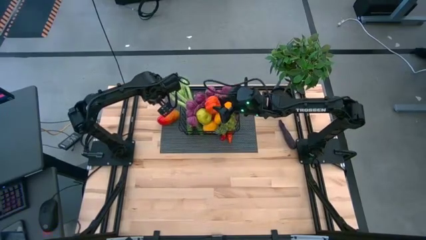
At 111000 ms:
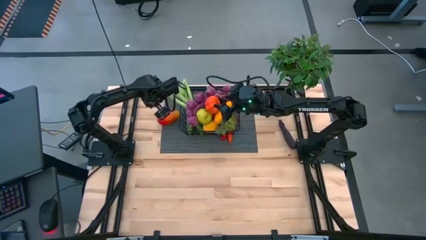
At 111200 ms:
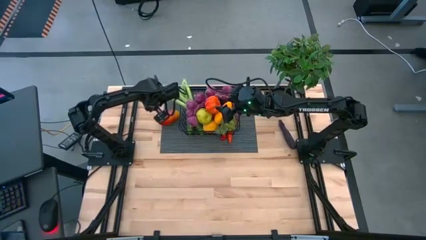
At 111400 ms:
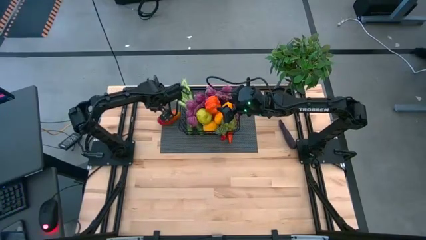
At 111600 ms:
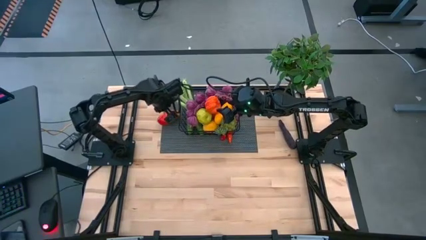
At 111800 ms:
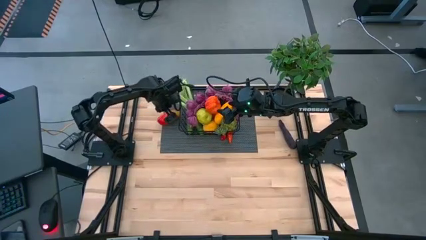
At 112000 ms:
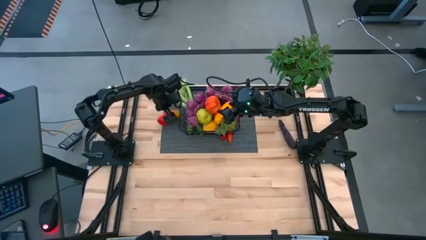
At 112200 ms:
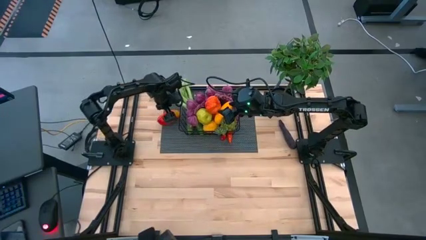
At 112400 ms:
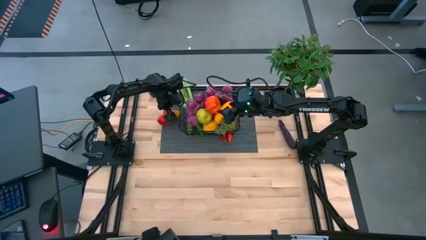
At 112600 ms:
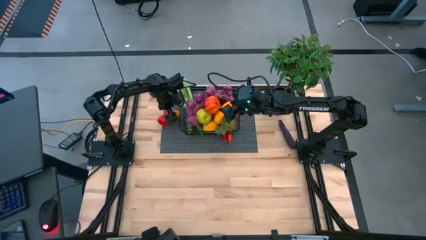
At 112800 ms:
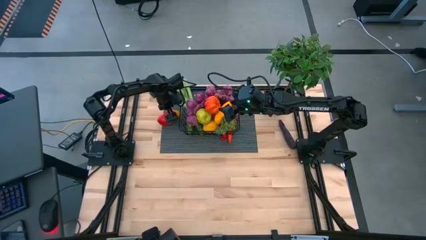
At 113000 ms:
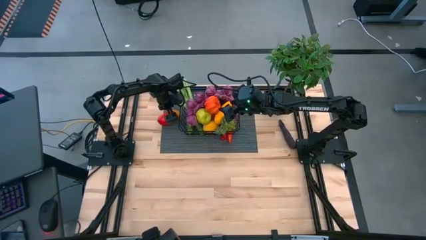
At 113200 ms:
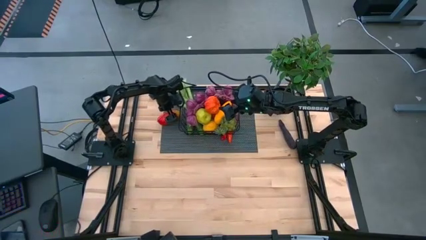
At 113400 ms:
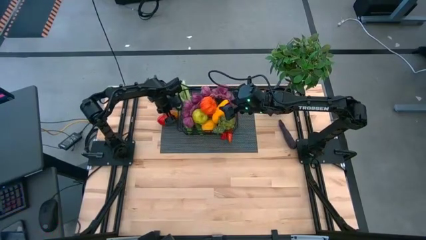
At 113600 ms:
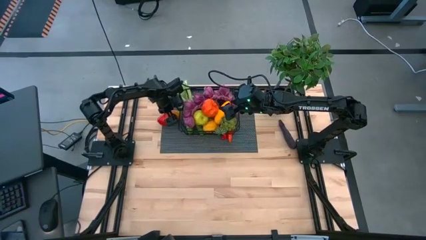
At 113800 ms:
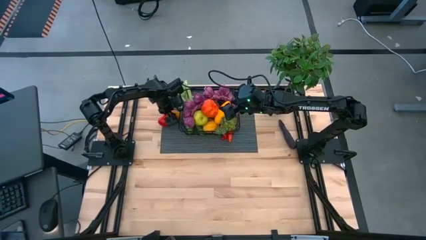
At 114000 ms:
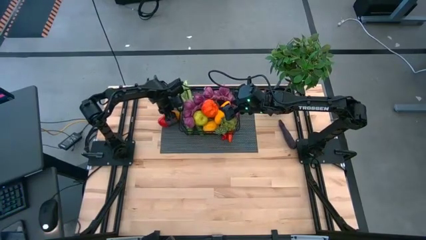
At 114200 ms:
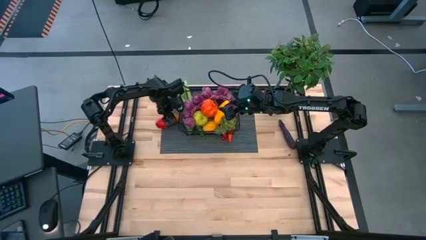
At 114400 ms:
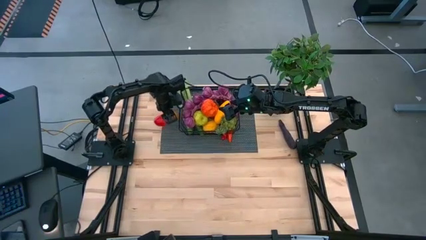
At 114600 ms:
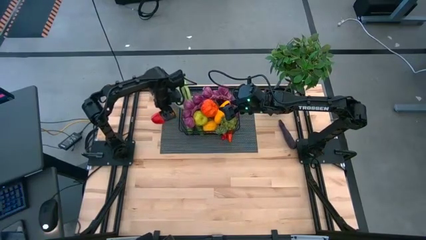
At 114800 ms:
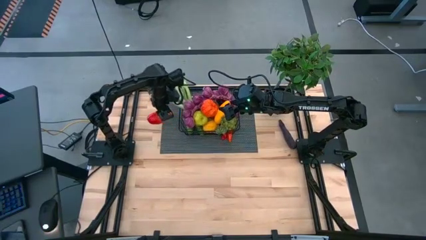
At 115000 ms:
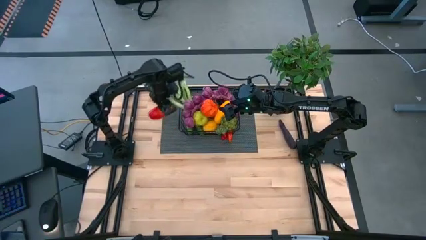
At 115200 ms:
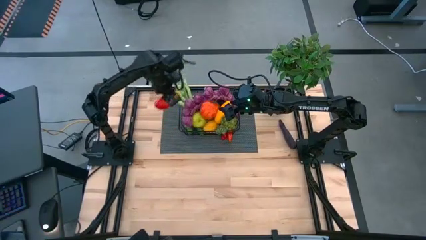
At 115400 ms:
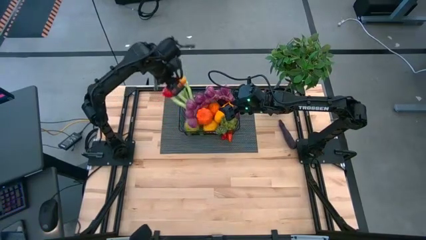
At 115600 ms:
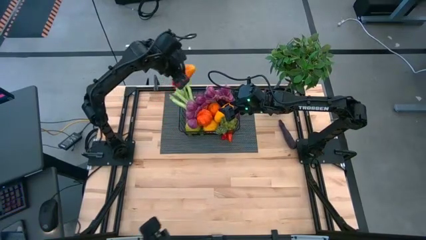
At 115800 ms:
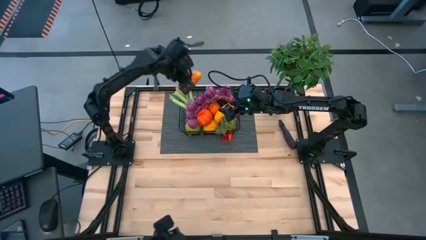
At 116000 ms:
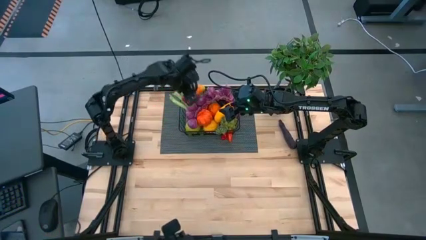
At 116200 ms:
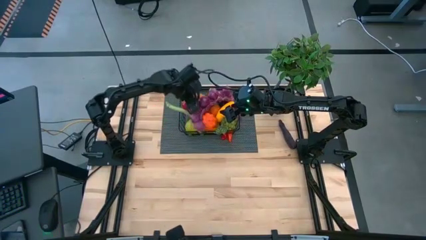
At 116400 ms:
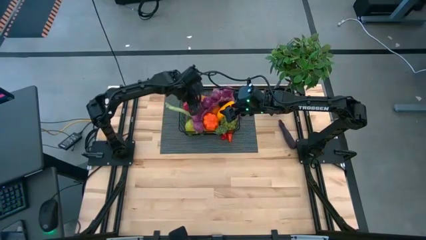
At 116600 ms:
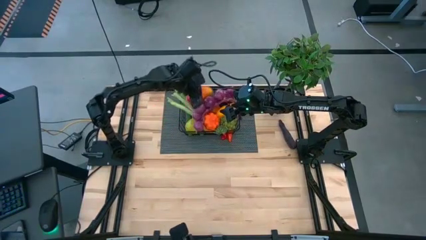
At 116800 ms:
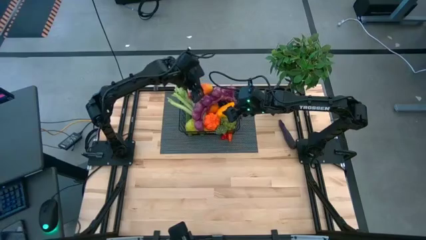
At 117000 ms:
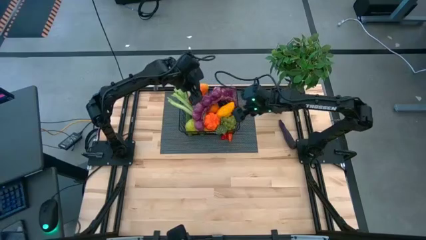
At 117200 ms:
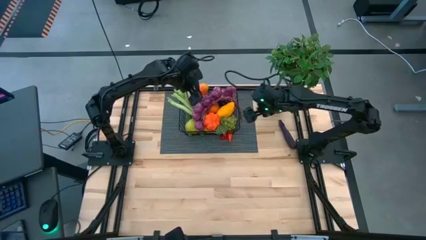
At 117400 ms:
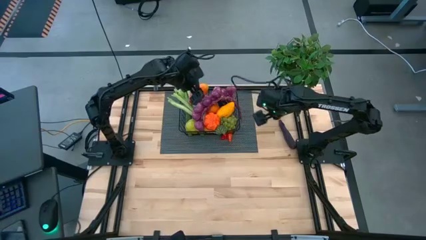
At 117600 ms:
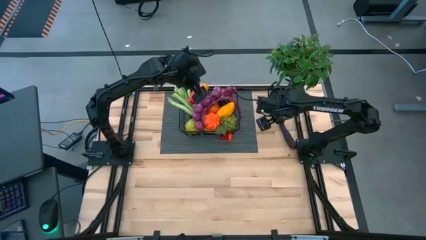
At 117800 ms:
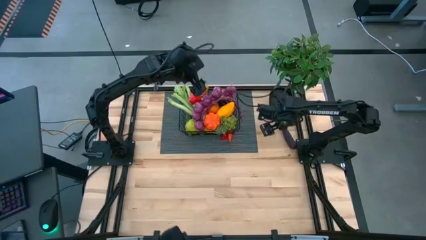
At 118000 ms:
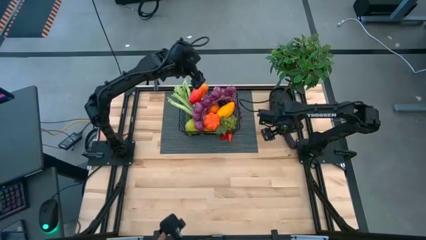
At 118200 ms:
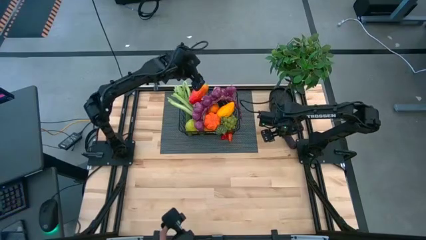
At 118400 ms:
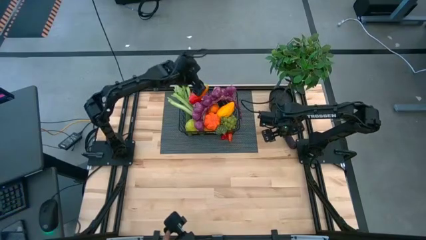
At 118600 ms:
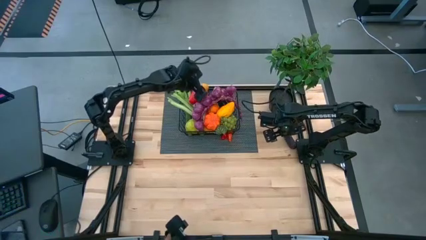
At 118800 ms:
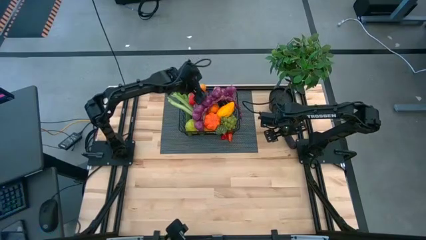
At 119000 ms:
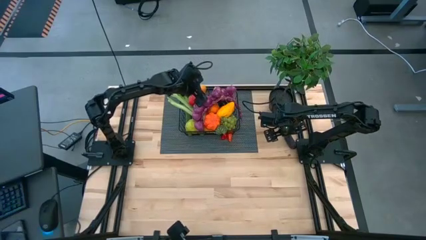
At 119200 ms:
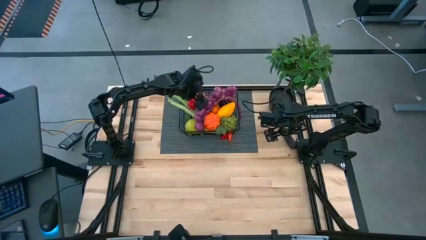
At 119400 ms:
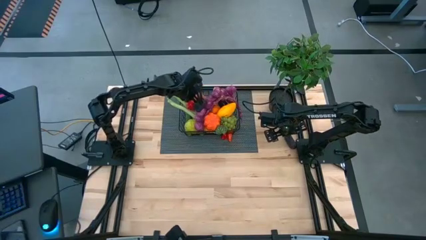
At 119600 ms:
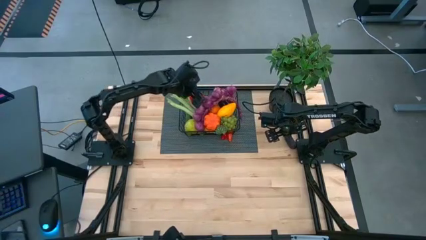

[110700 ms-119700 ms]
Task: Build produce basket
Put the mango into the wire basket

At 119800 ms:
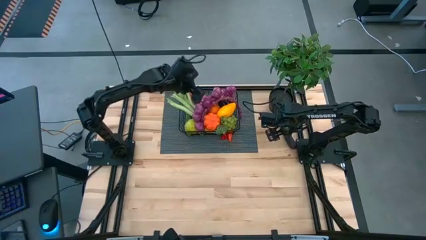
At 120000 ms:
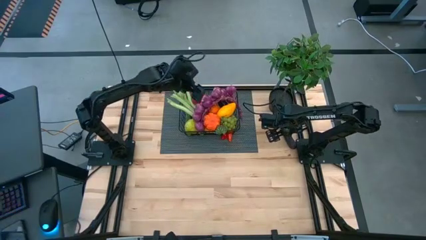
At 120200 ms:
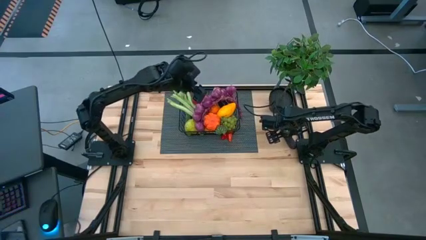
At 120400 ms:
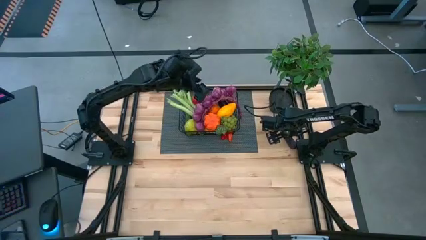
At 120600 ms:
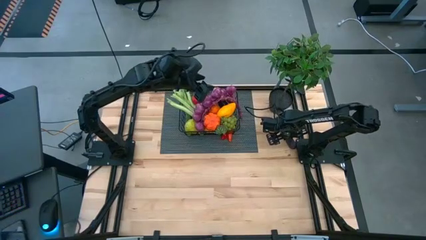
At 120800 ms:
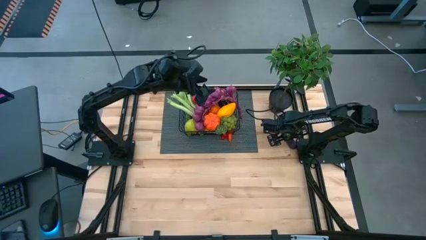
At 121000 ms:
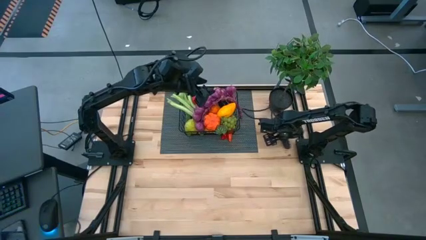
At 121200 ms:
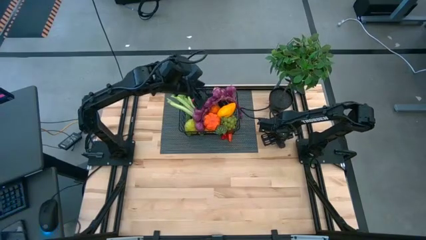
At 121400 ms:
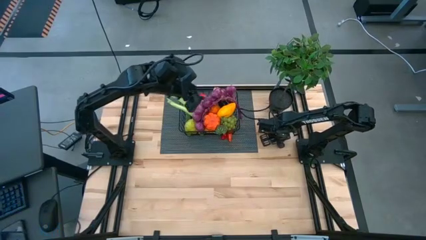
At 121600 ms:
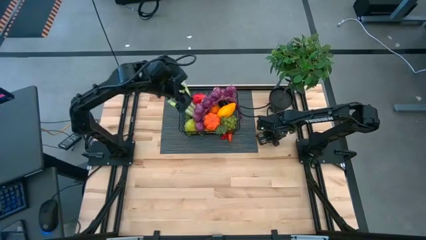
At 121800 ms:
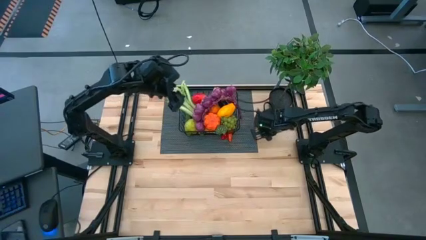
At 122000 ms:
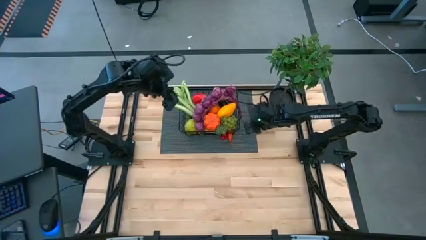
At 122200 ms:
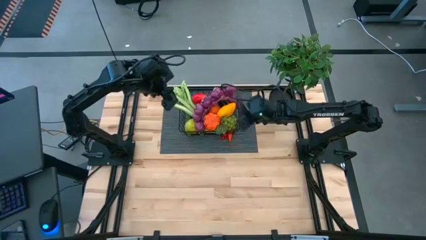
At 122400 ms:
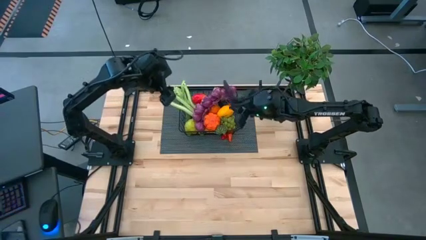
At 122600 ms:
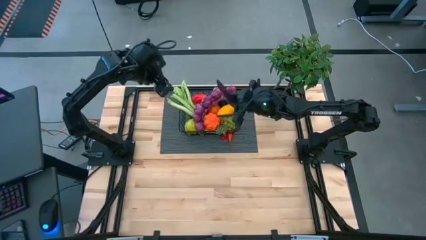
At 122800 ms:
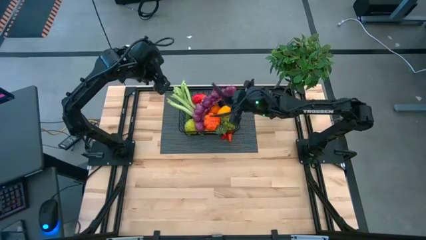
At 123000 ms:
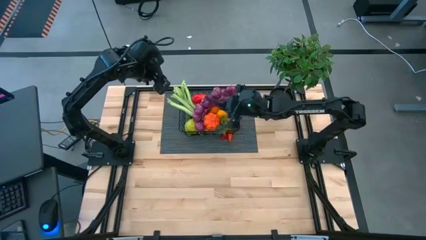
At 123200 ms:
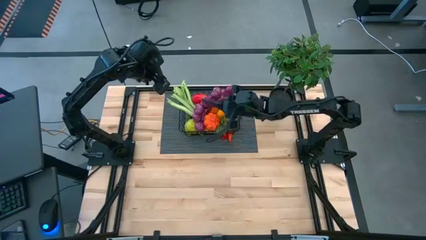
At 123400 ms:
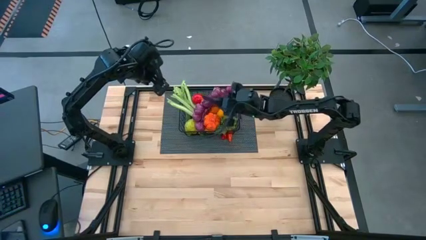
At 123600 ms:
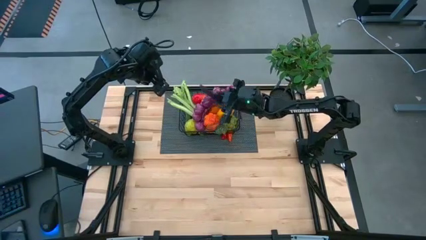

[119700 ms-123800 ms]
Put the eggplant into the wire basket

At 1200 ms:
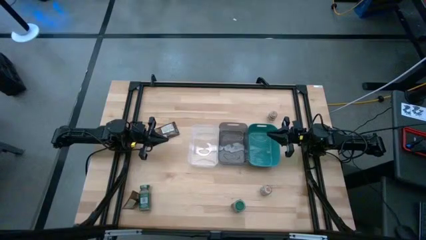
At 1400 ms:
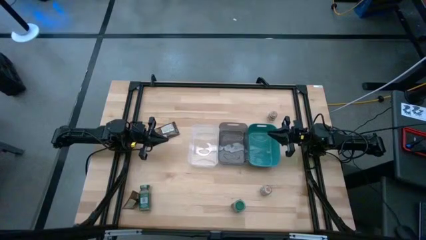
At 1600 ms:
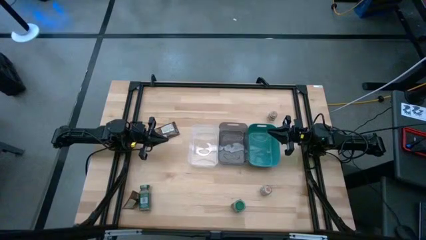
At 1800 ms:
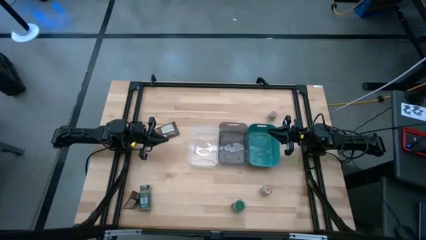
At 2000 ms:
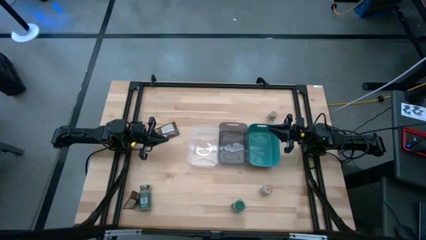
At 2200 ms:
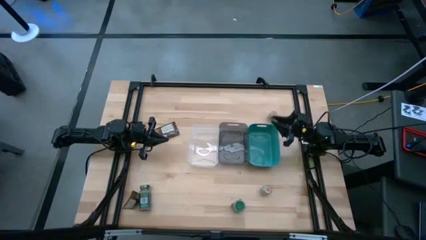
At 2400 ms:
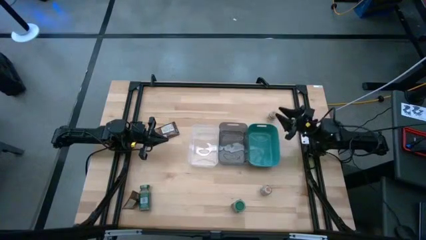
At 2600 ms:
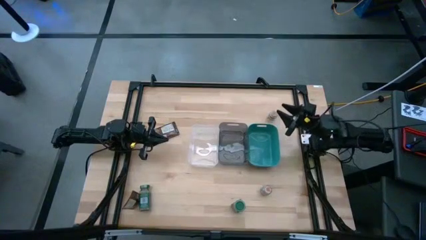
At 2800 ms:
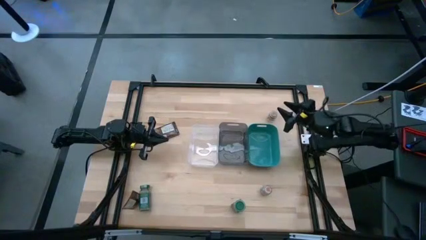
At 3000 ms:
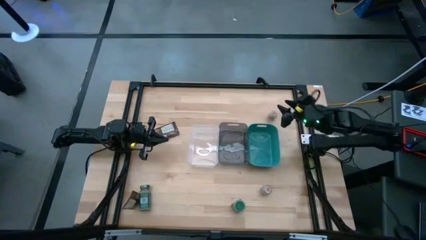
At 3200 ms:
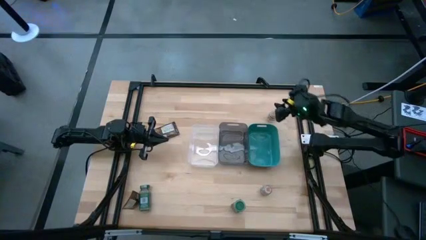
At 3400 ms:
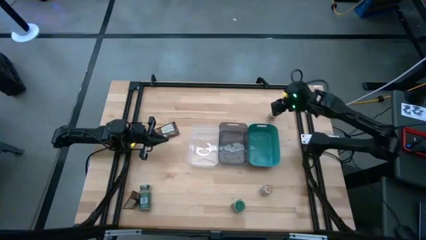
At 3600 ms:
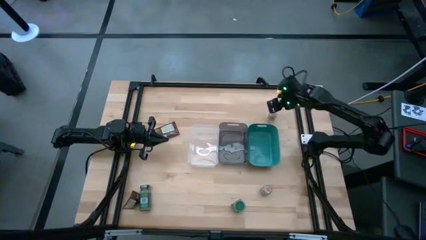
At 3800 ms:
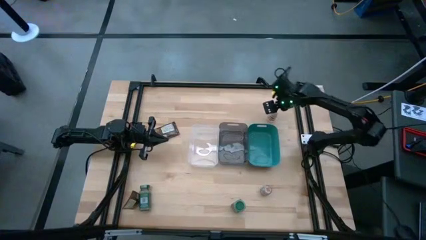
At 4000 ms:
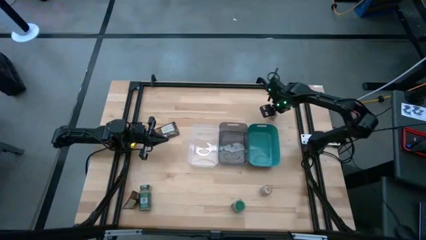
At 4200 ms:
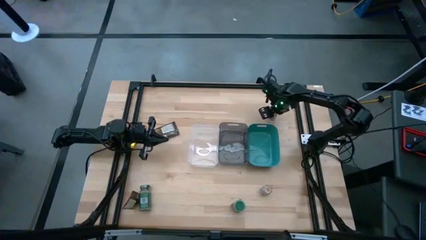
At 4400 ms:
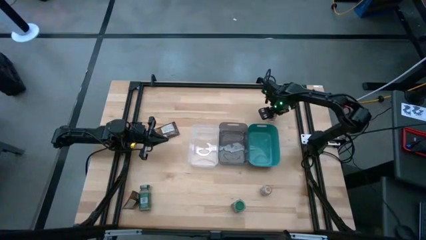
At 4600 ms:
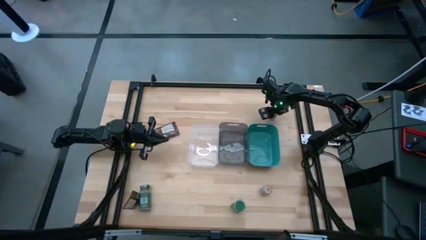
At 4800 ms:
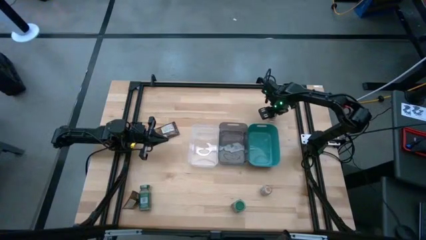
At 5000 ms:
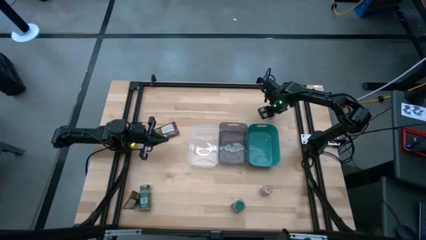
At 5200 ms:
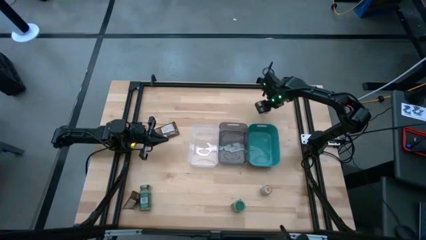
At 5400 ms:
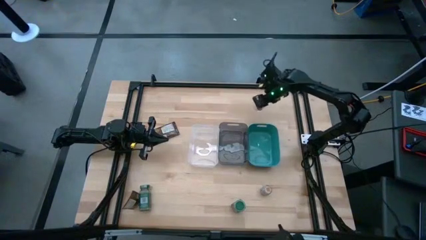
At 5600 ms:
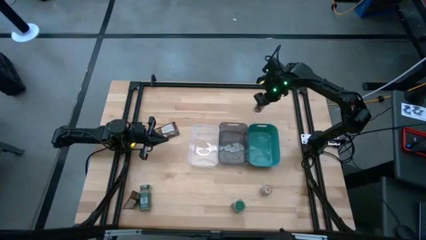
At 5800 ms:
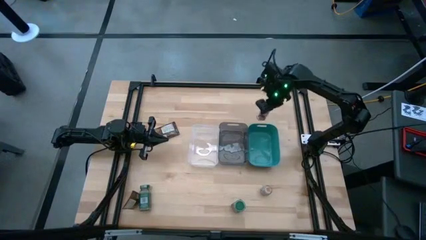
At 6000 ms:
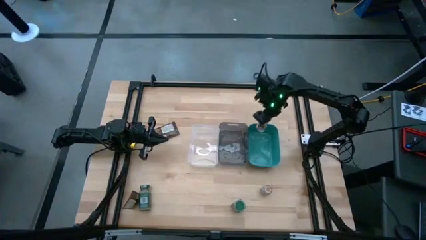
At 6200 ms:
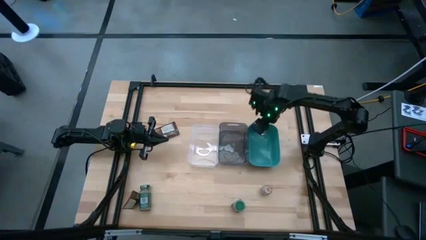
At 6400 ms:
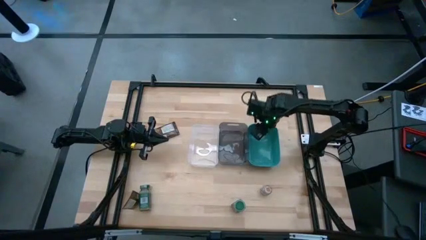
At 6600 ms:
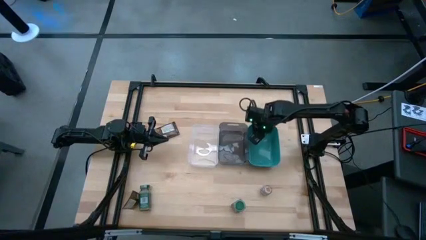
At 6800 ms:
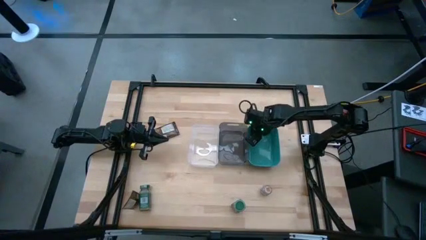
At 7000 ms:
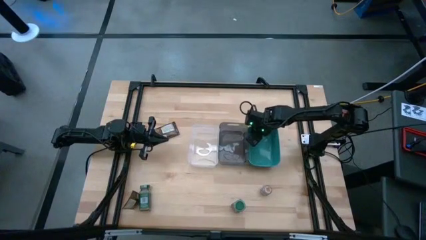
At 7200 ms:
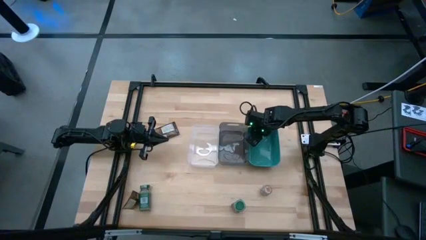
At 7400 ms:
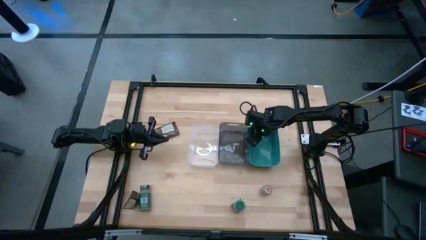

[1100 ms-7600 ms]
Task: Sort spices by type
Put the top brown seasoning bottle into the green bin
